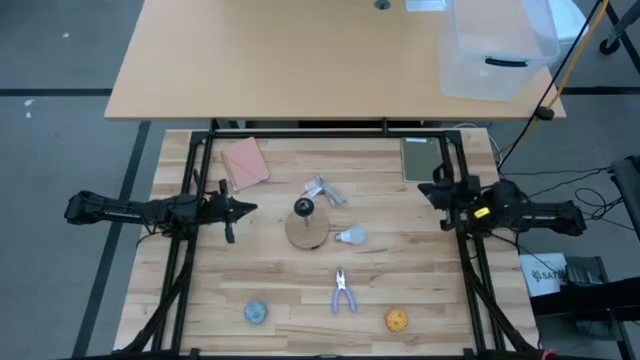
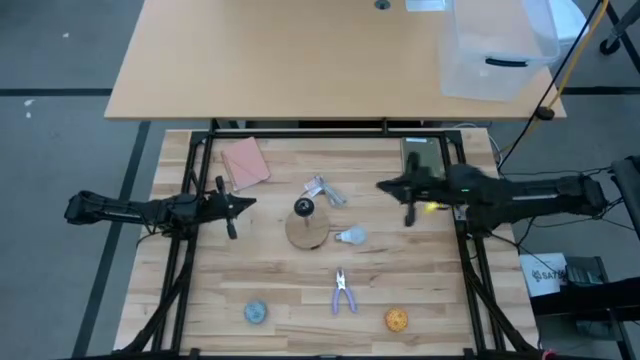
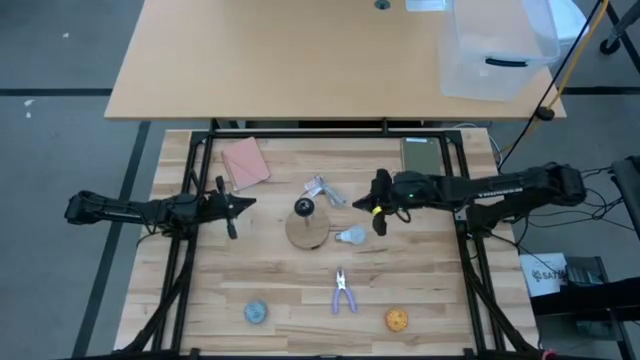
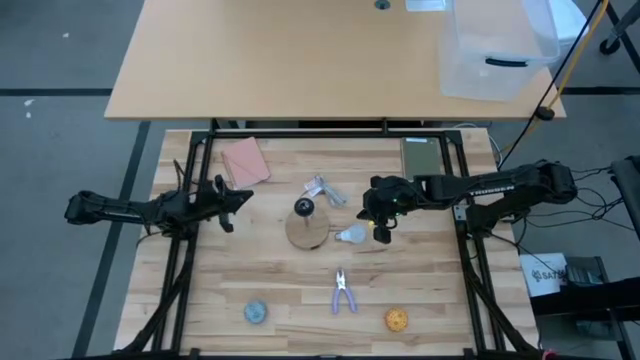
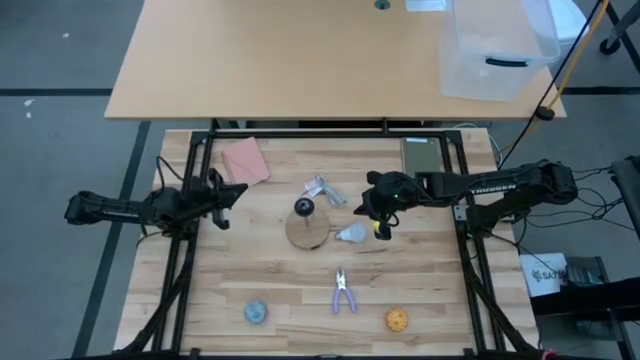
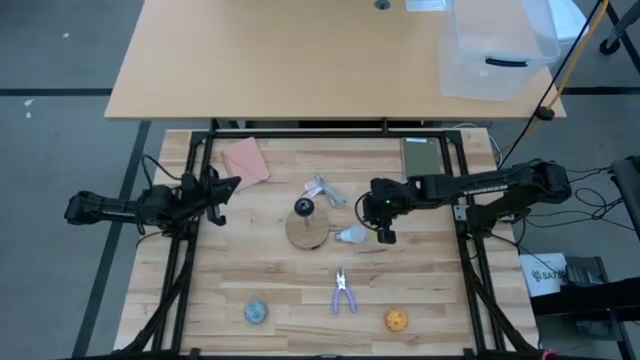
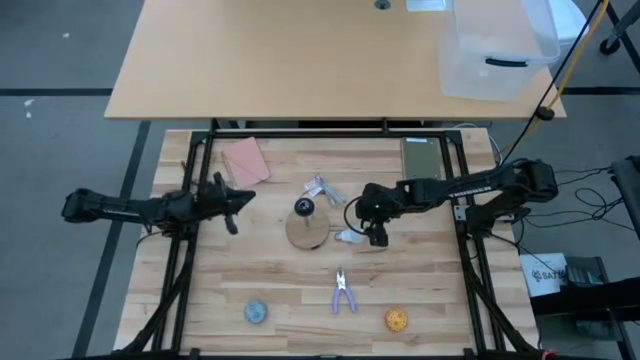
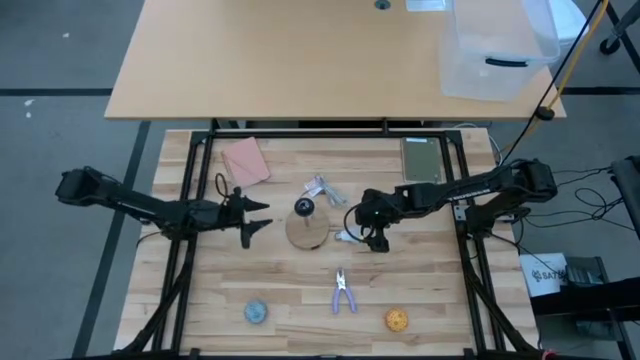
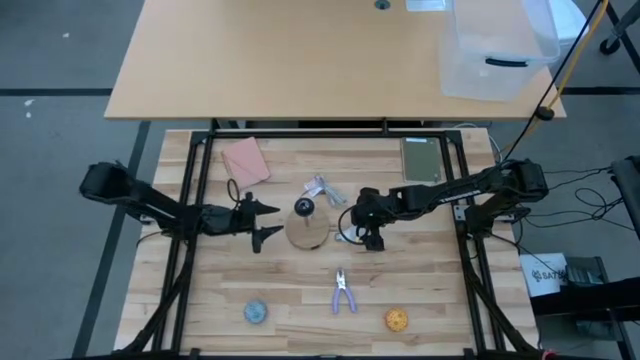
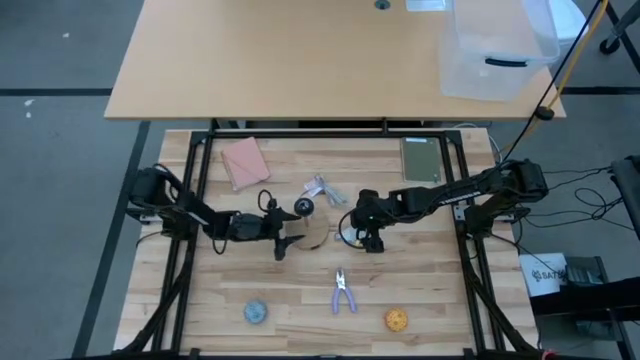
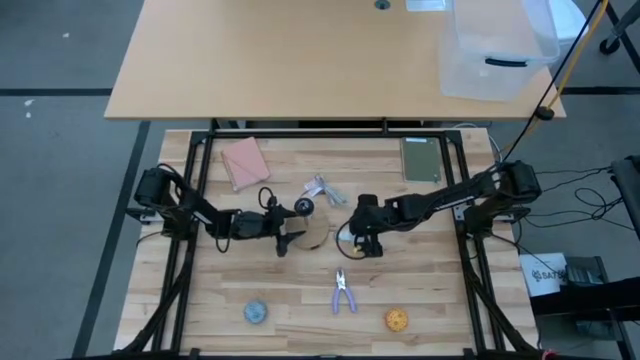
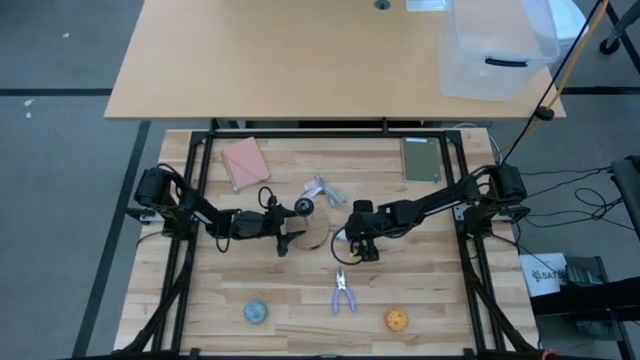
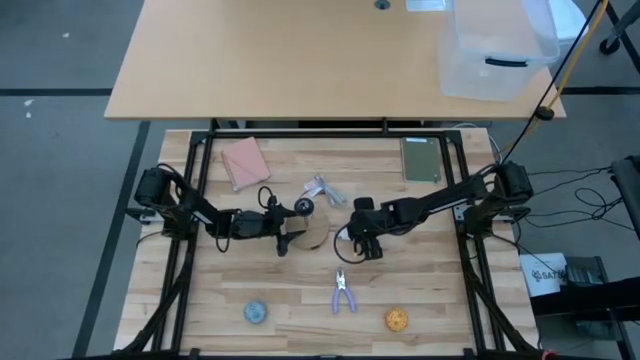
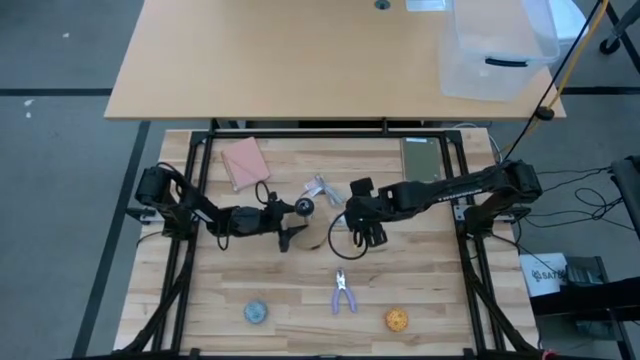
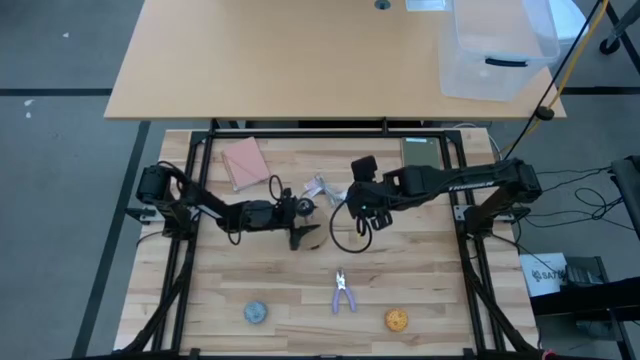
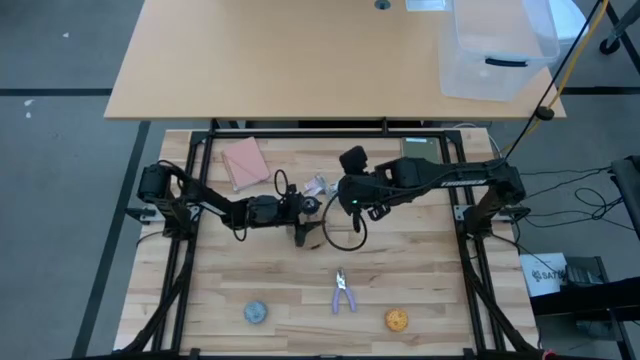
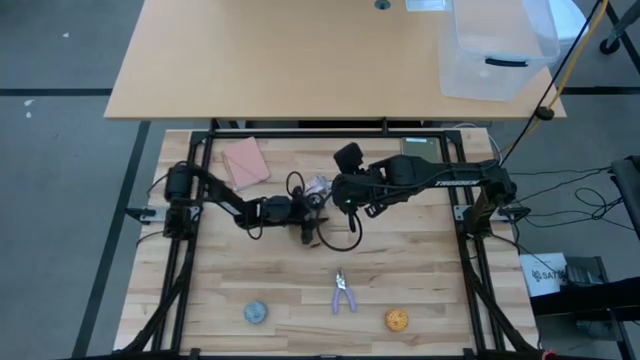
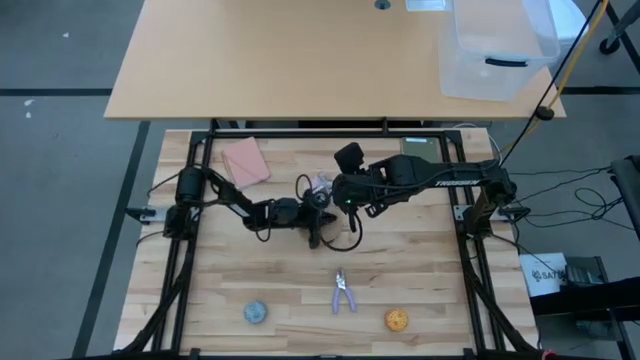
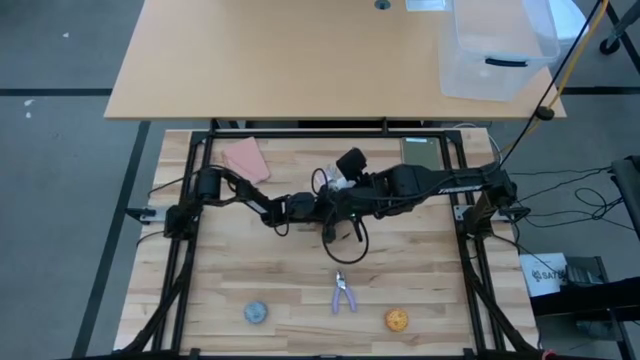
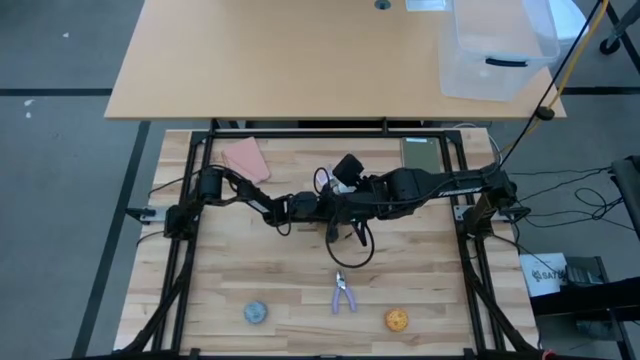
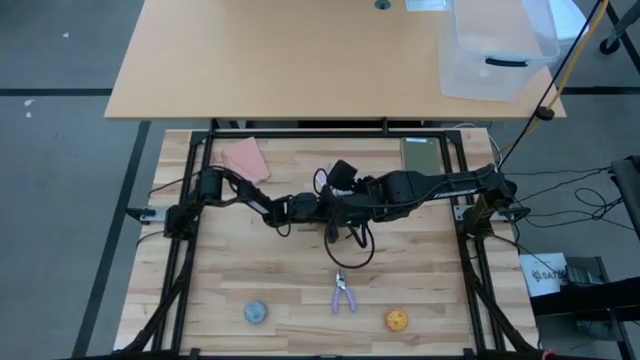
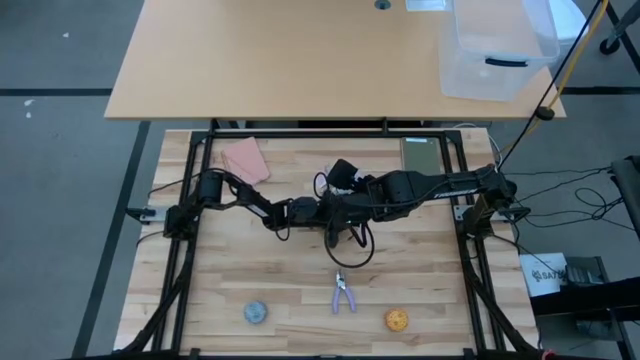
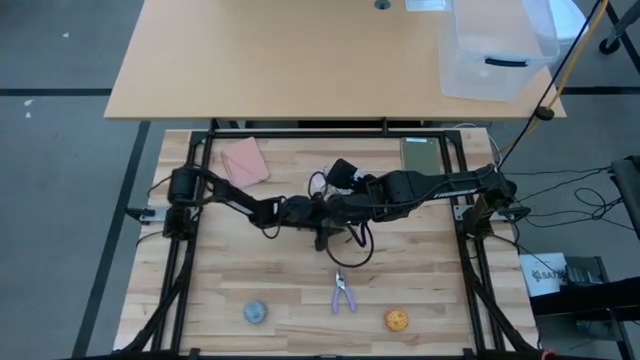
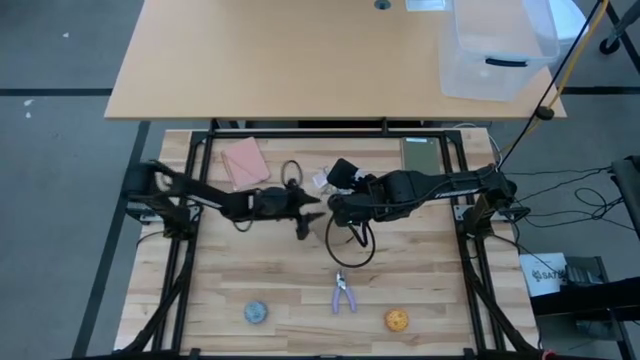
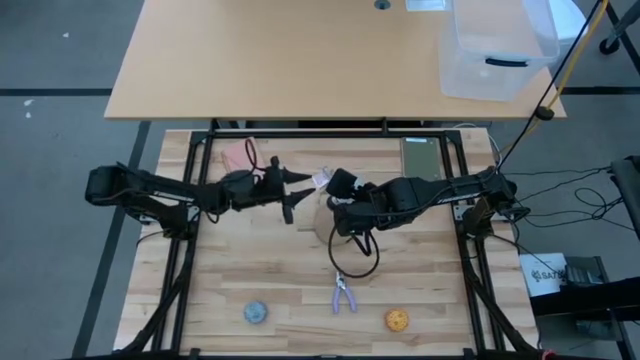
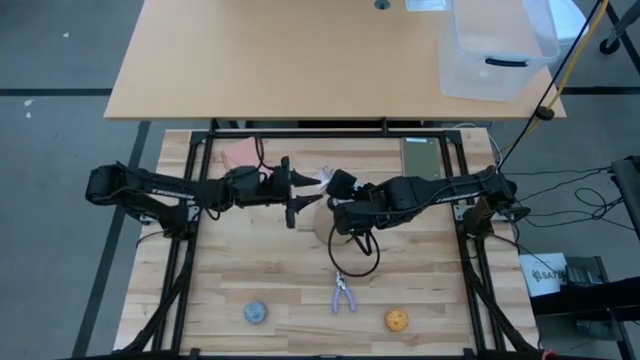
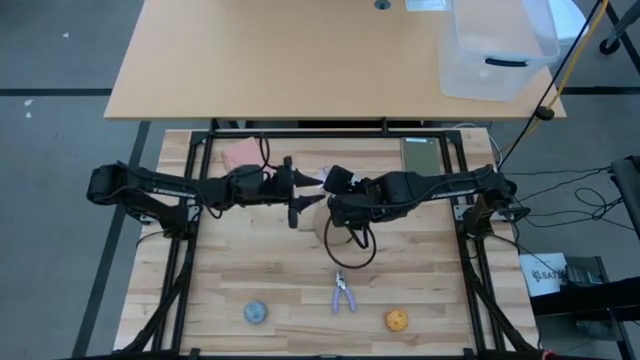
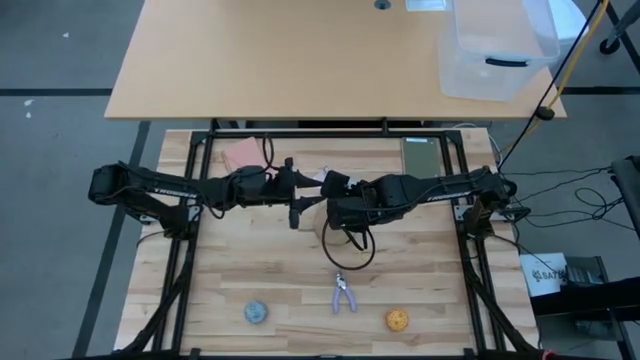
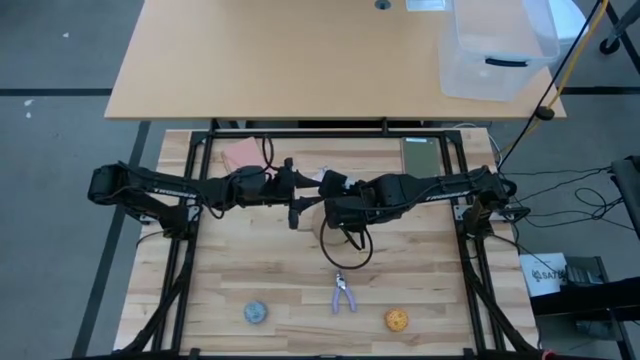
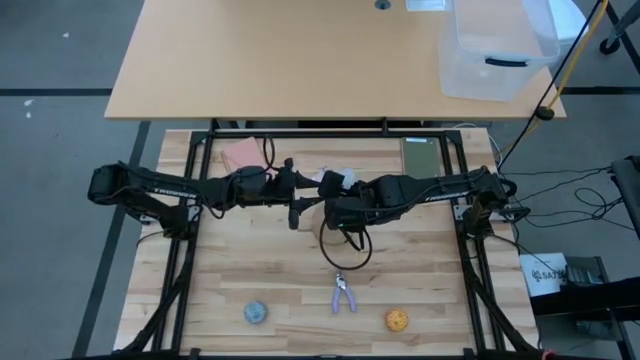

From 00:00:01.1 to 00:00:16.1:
Task: Screw lightbulb
Insert the lightbulb on the lamp

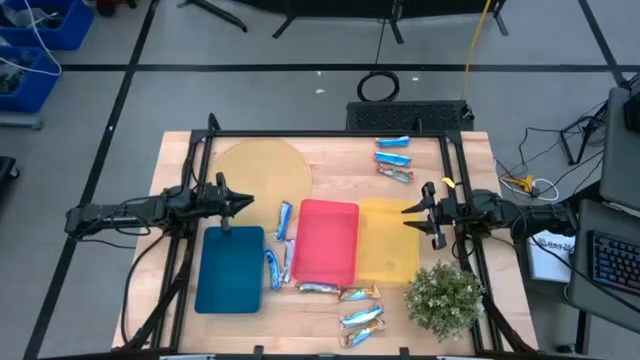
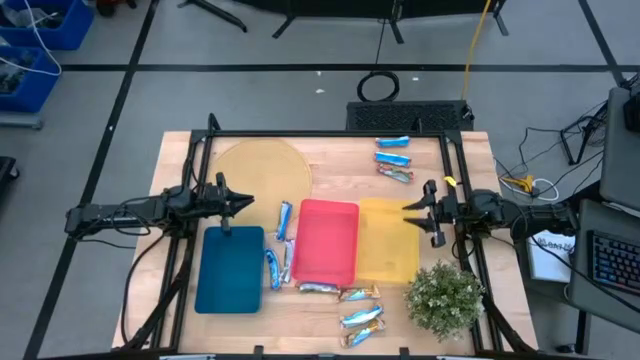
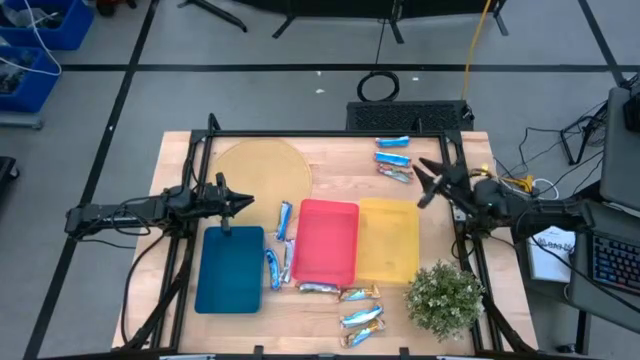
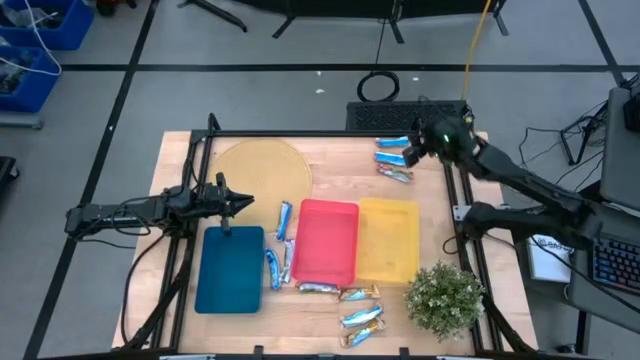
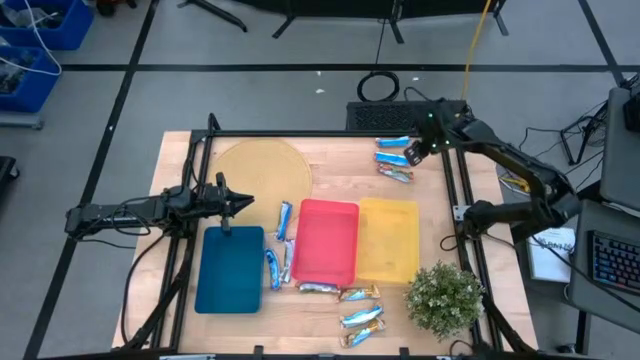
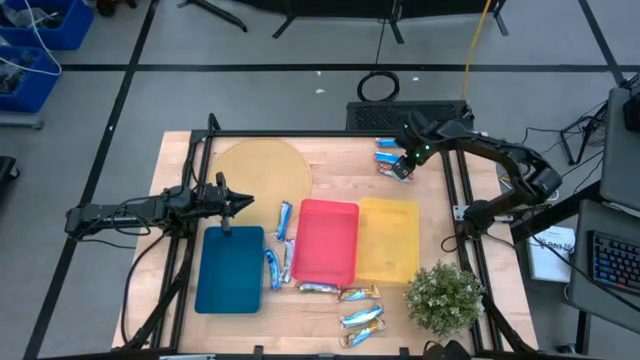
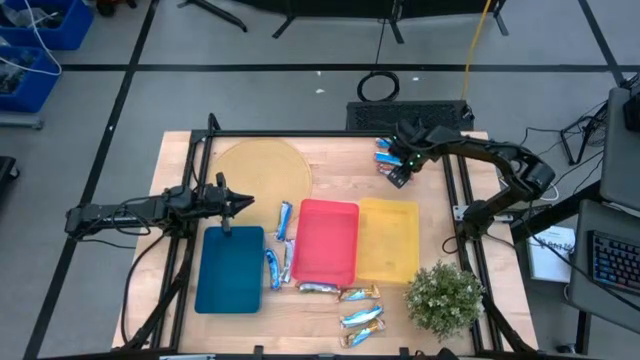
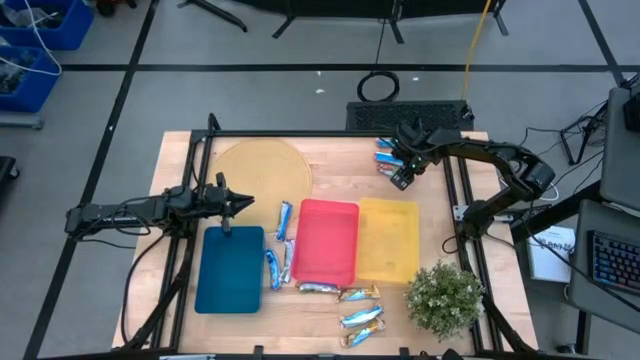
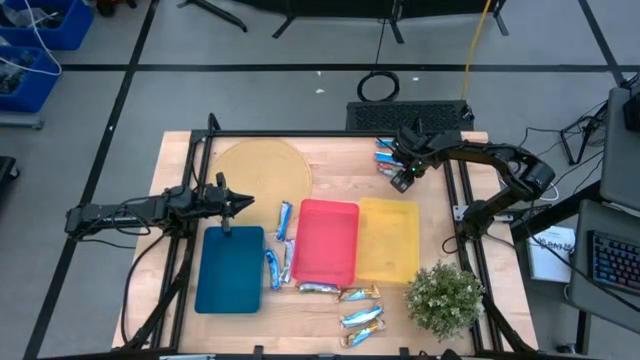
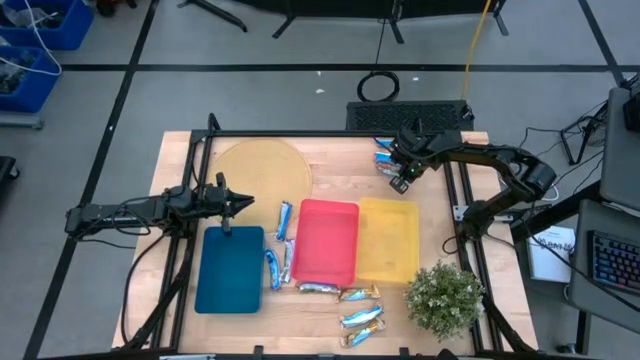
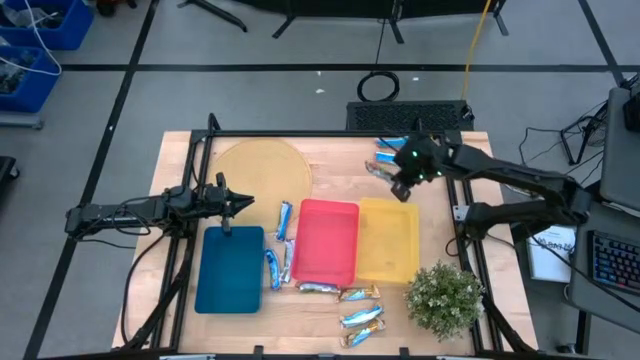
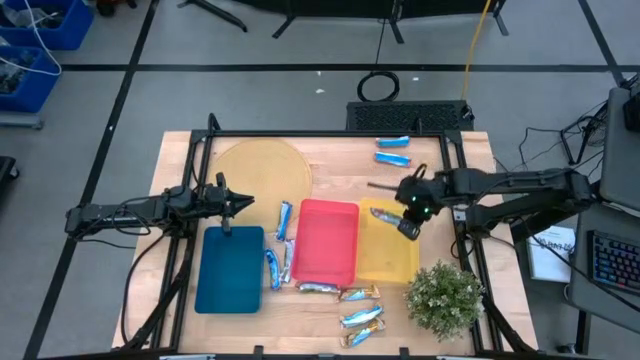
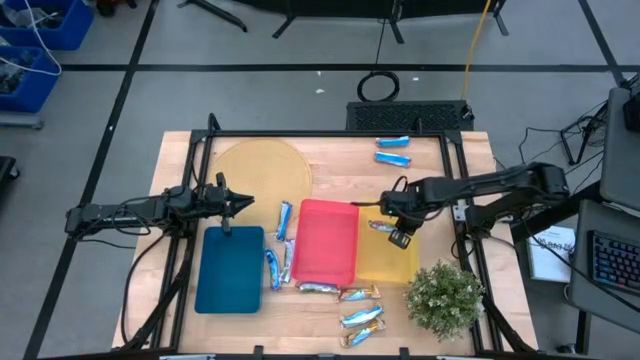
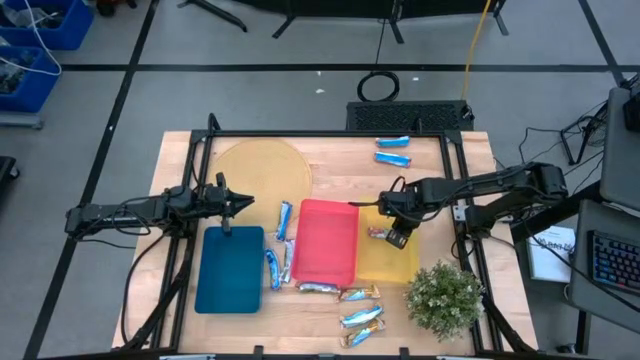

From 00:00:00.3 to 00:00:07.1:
Task: Pick and place Granola Bars by type
Put the red granola bar into the yellow bin
